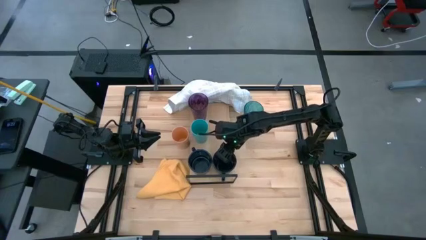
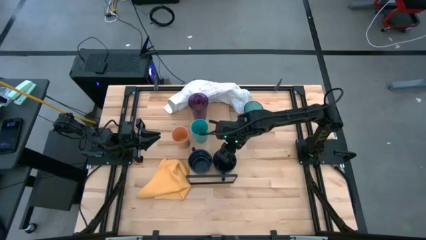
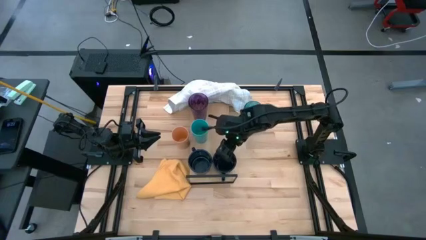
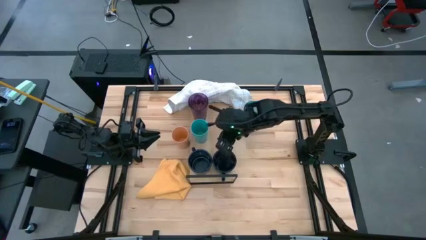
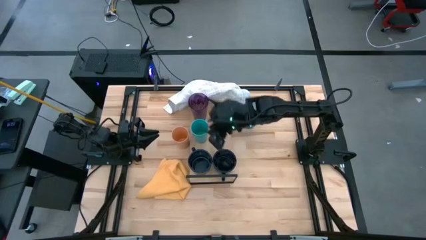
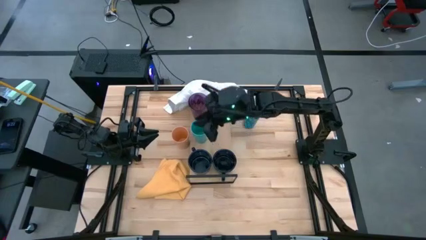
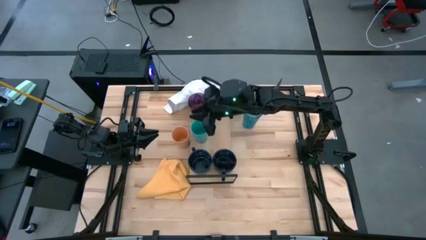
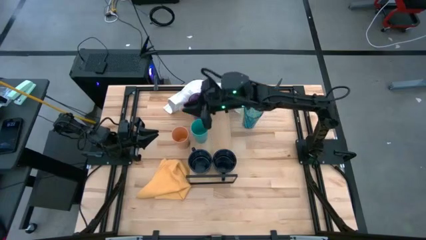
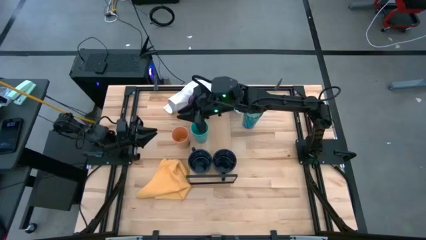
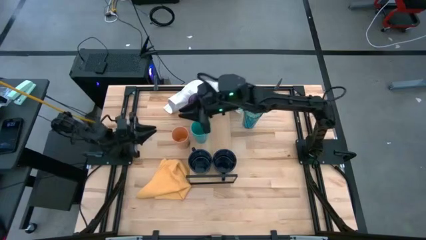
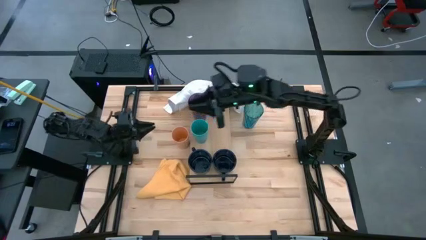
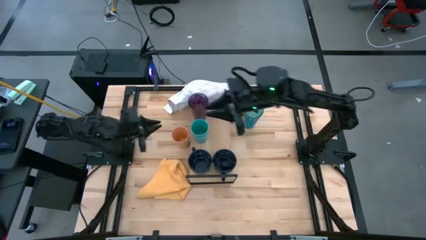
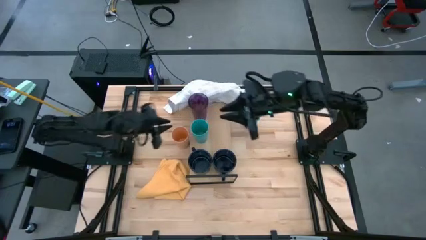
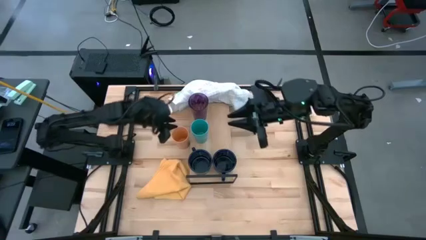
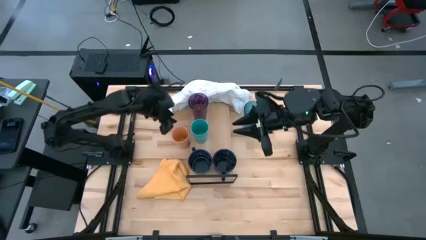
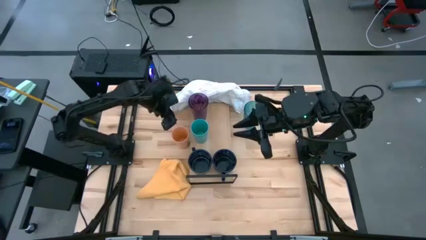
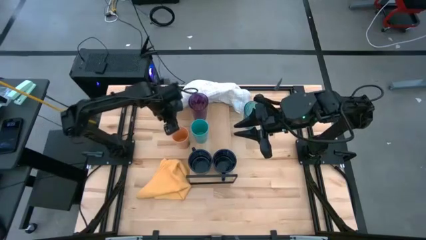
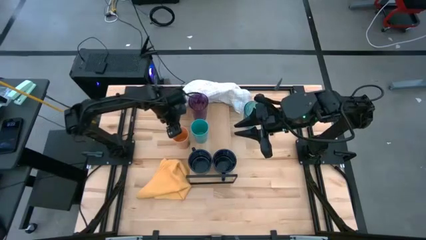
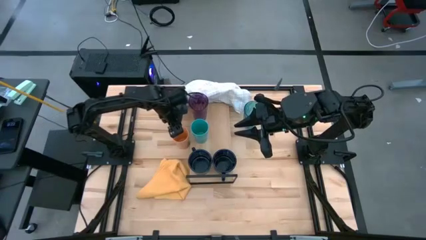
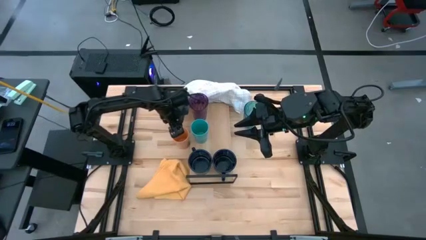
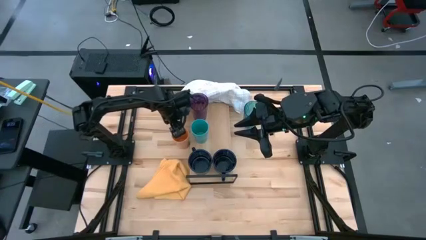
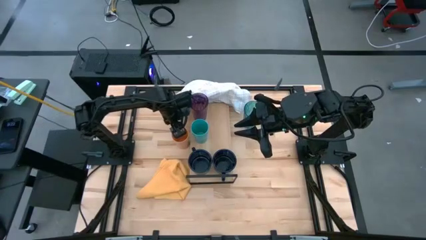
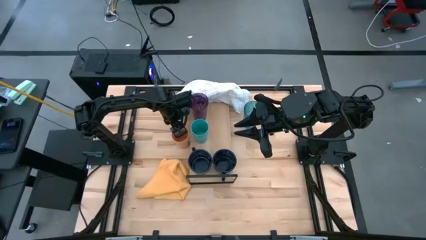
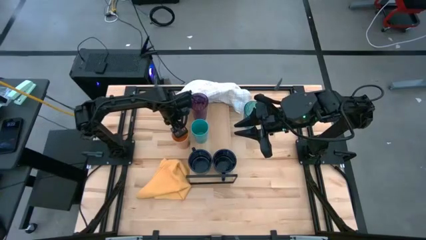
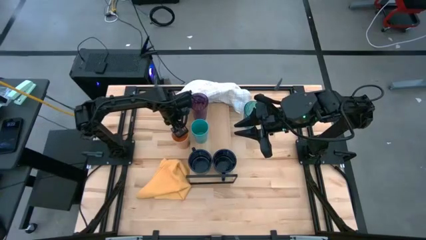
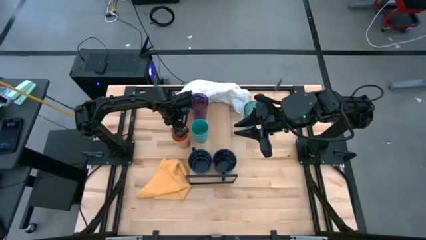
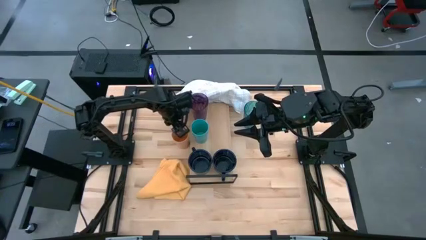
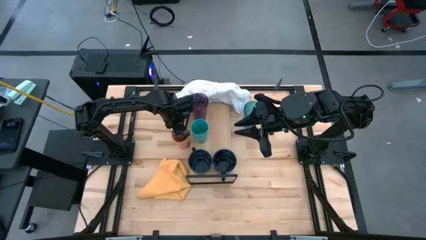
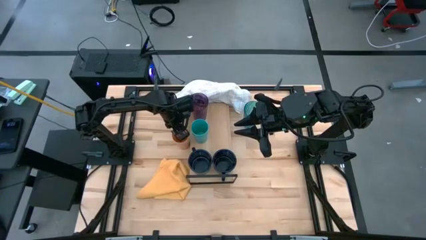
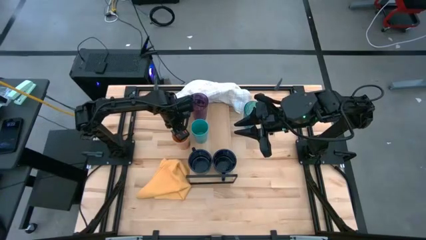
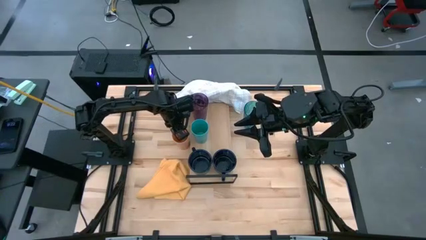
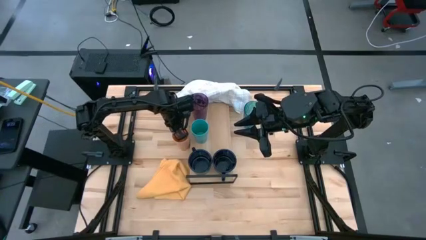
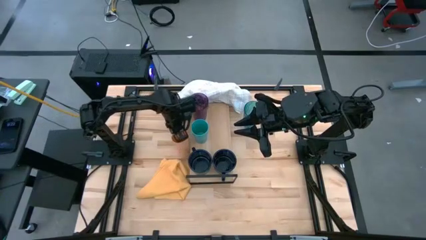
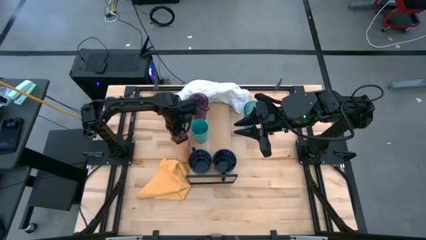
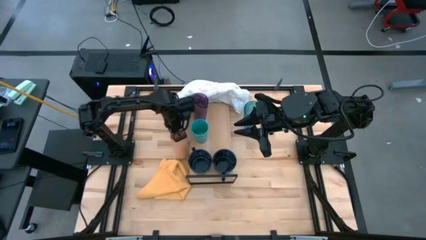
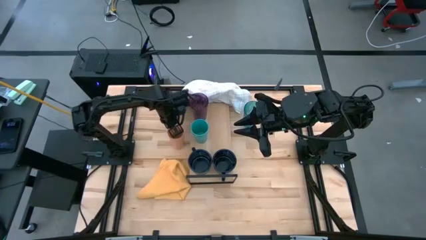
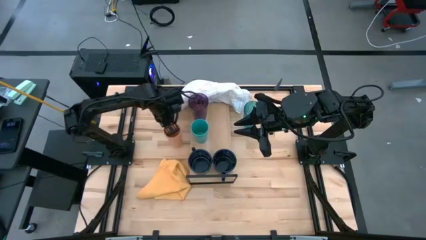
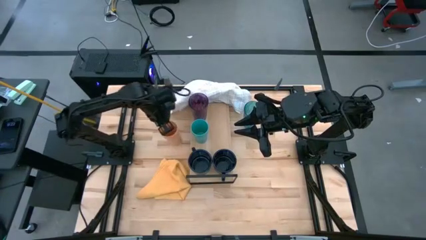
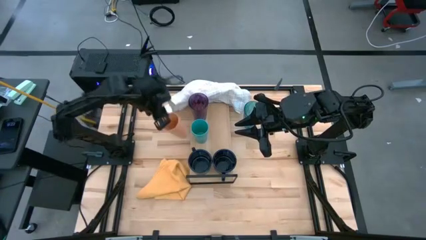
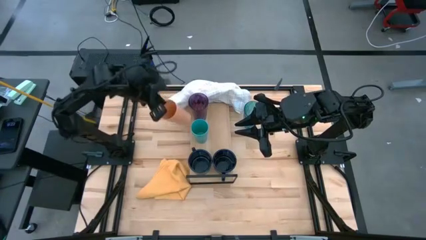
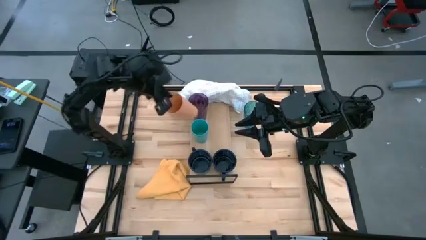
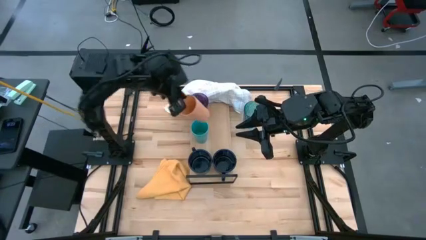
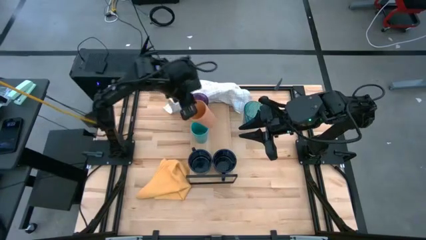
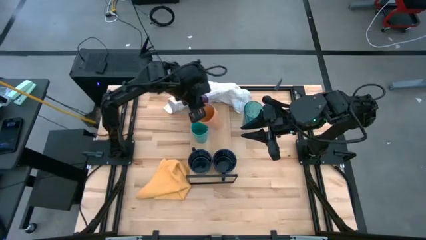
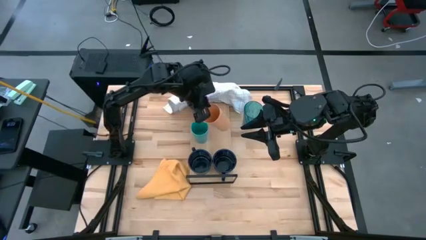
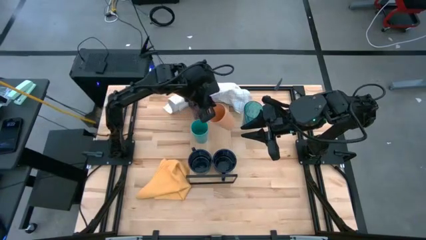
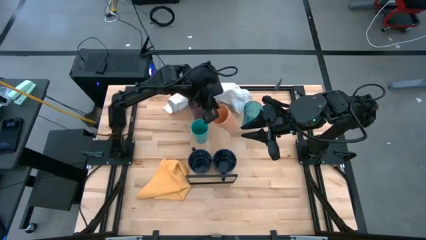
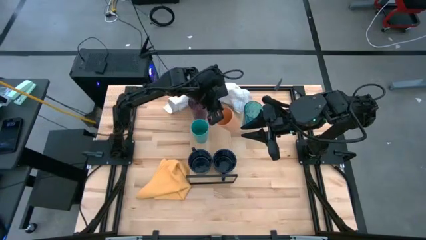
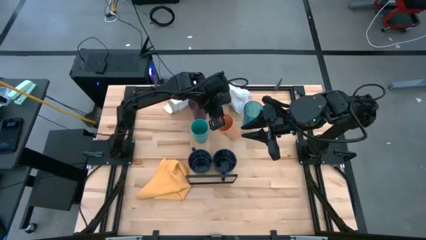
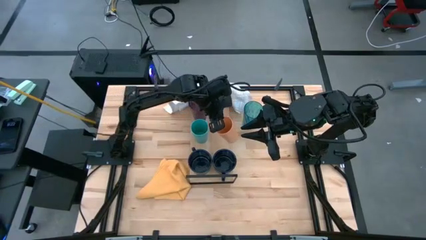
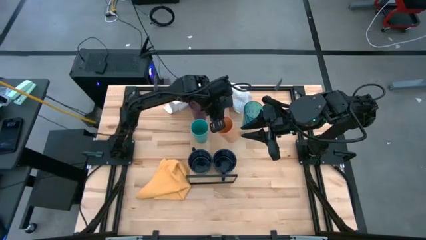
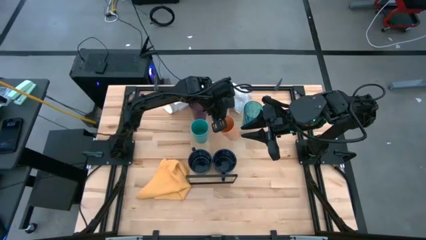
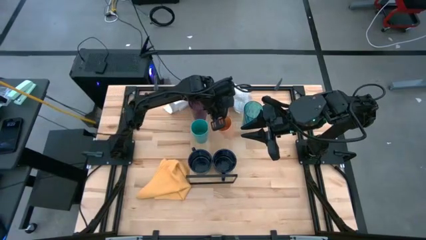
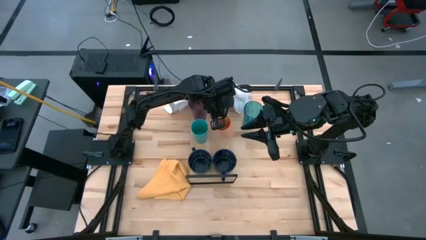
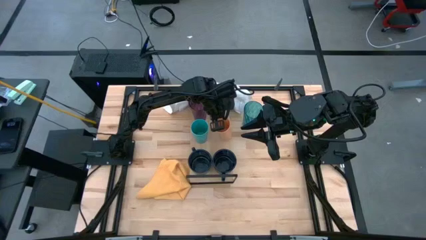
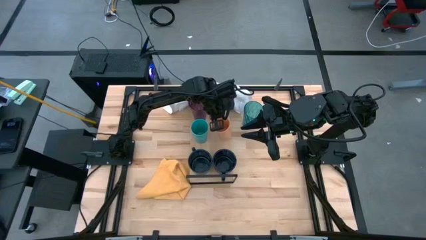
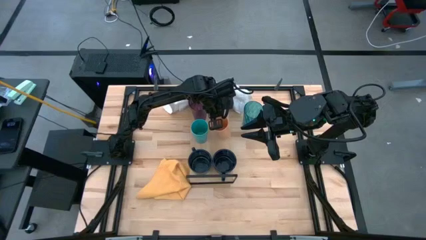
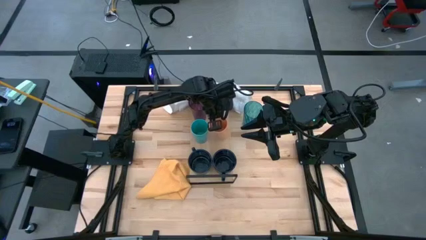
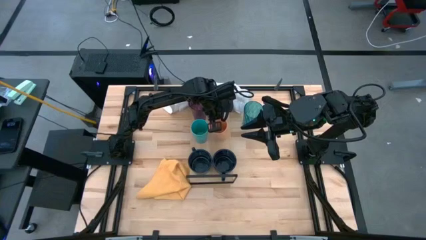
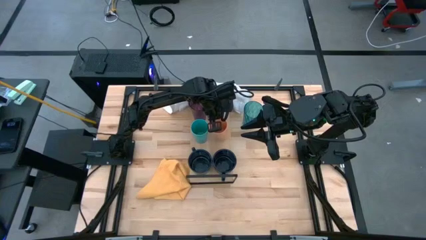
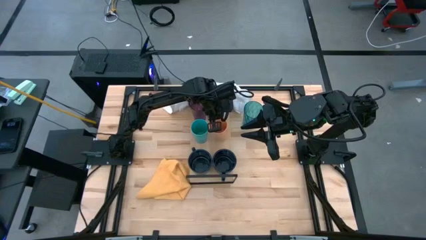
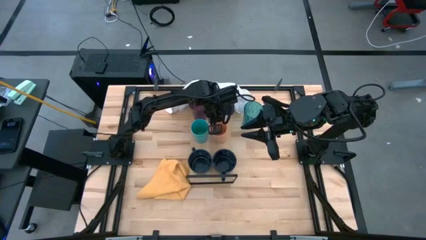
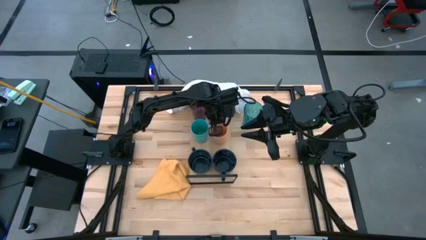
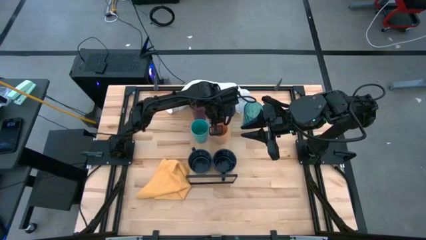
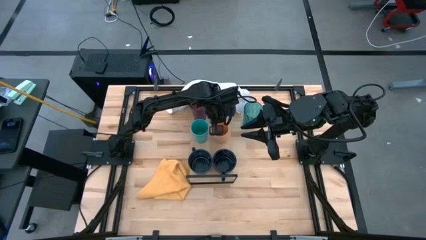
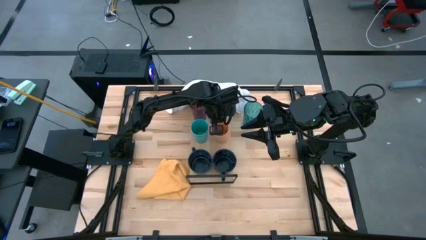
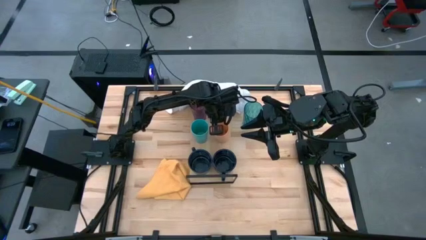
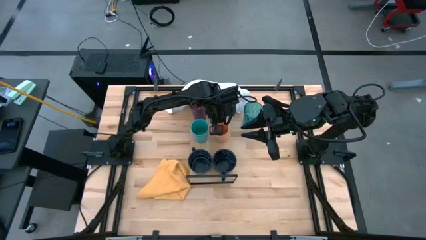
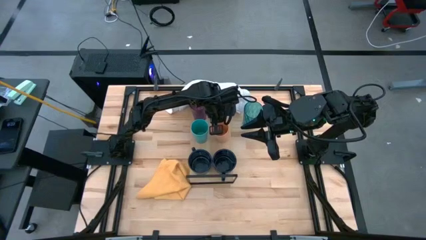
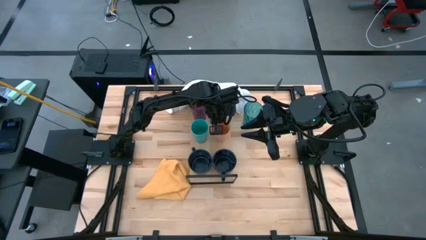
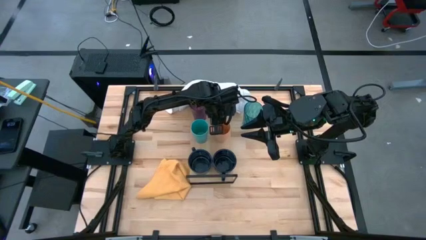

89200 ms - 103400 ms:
Task: Stack small to large cups/mugs on shelf
Put the orange cup on the shelf

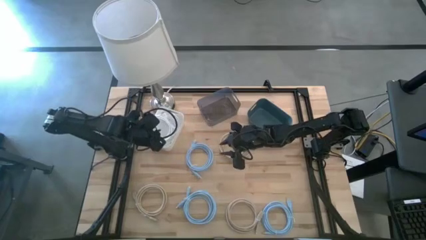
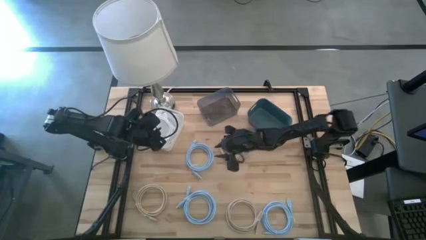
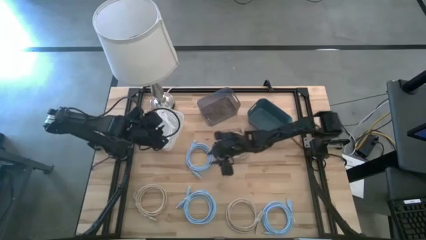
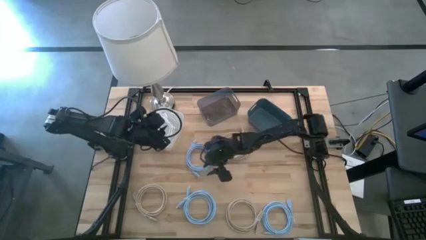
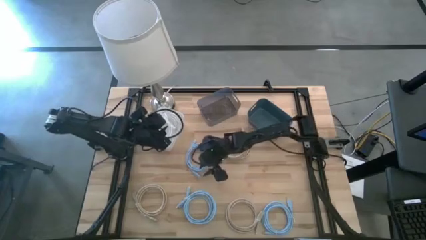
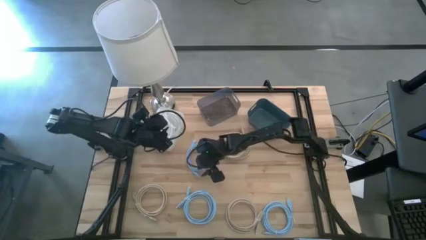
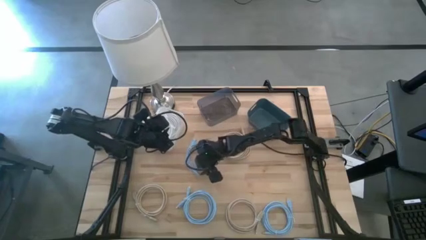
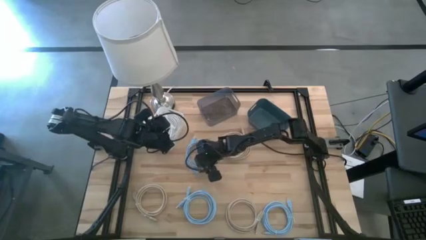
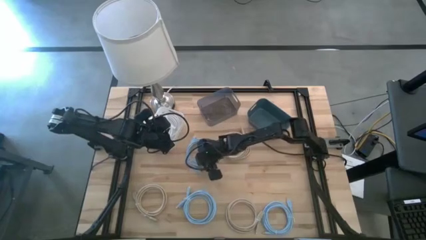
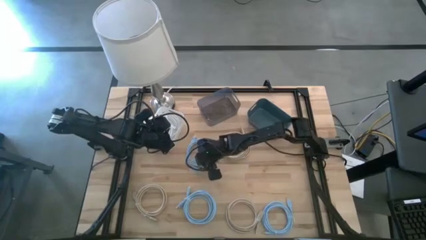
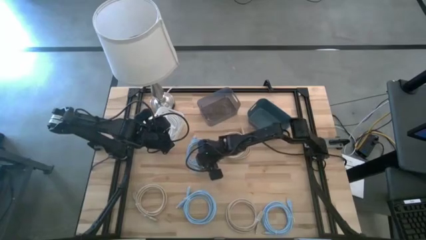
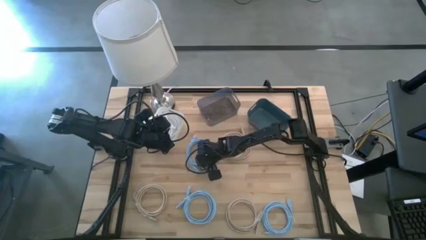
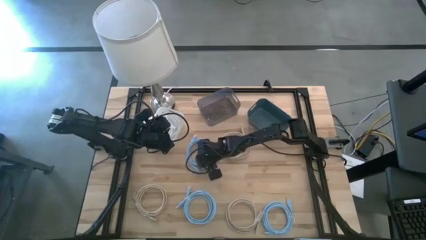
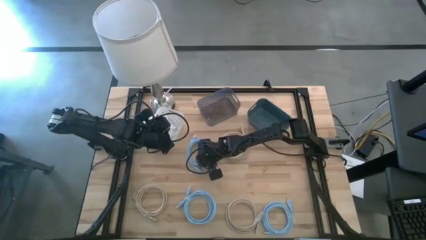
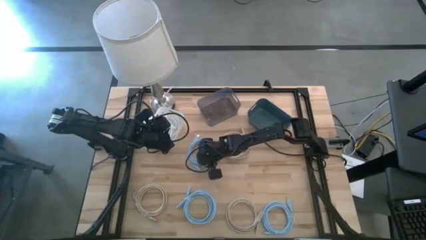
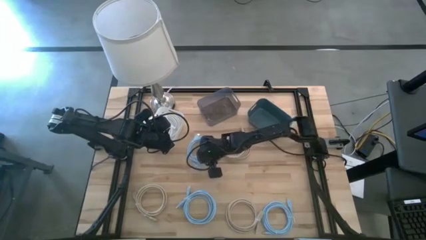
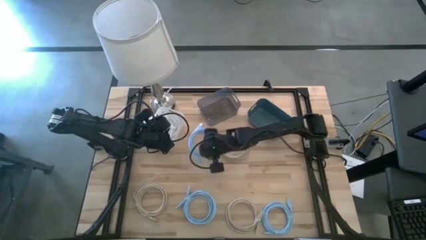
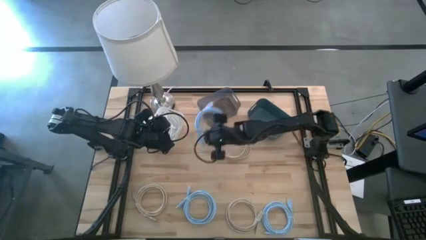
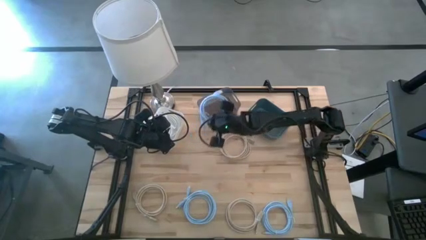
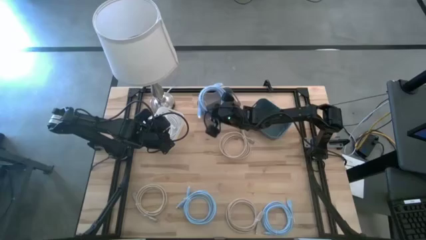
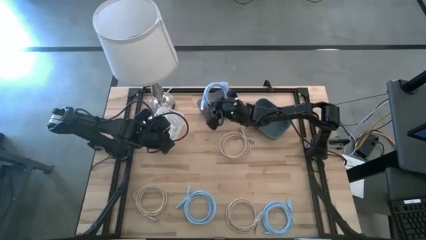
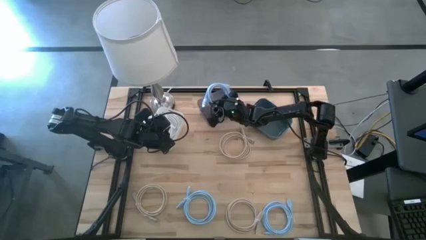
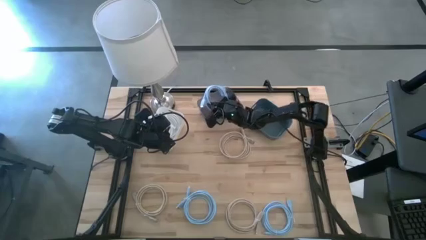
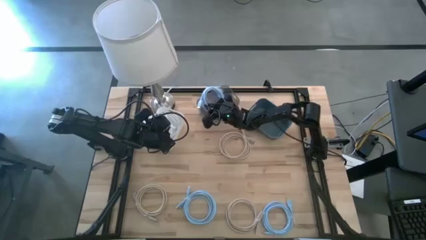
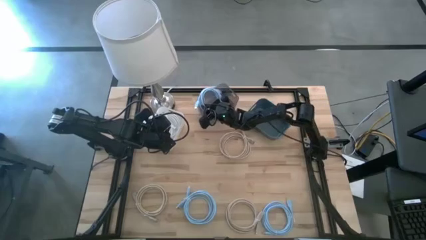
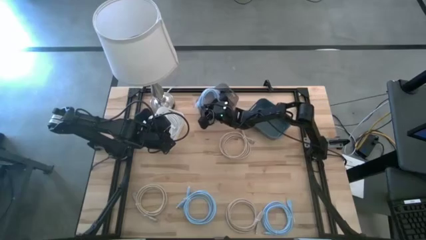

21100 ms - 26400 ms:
Task: Sort HDMI cables
Put the top left light blue HDMI cable into the black bin
